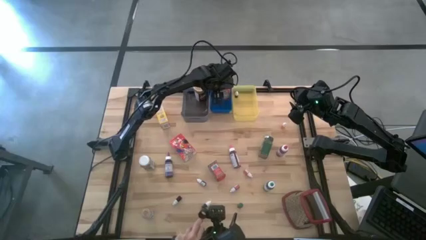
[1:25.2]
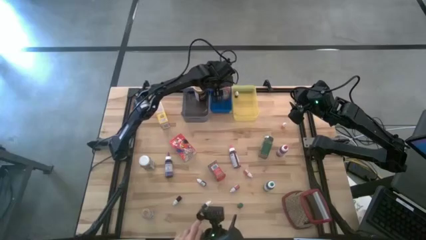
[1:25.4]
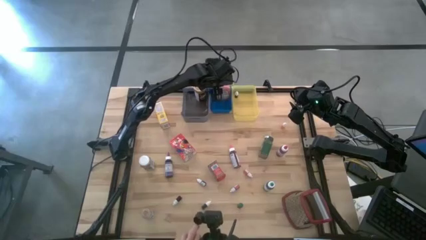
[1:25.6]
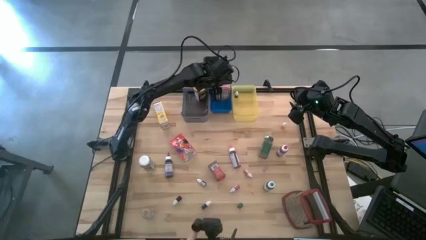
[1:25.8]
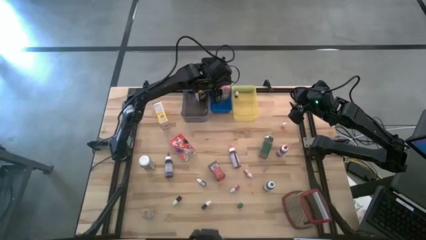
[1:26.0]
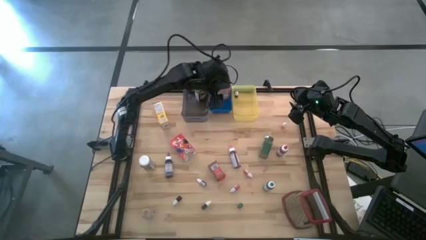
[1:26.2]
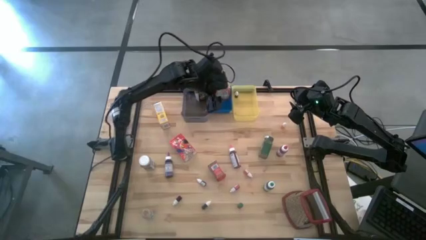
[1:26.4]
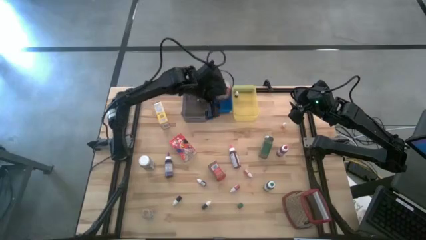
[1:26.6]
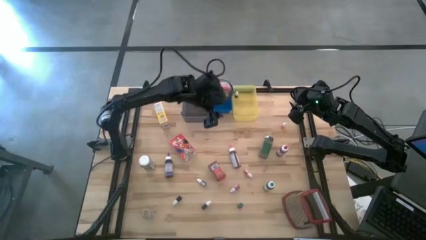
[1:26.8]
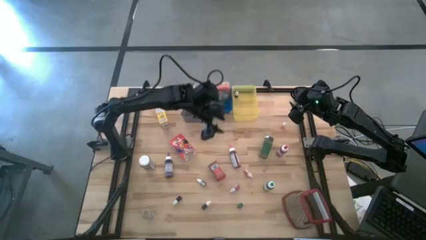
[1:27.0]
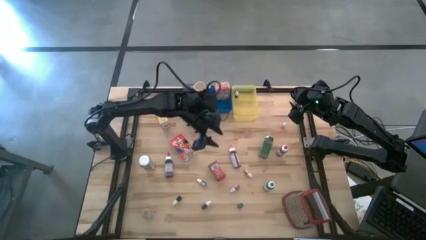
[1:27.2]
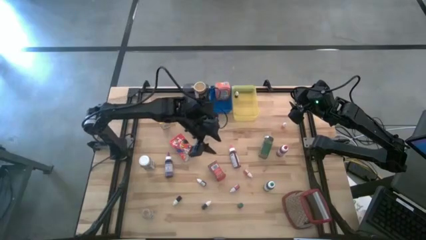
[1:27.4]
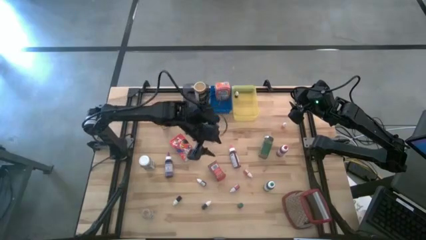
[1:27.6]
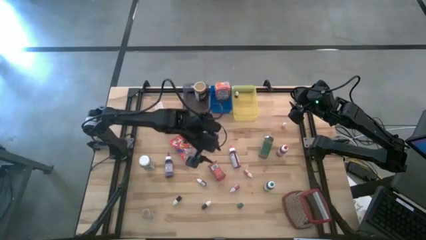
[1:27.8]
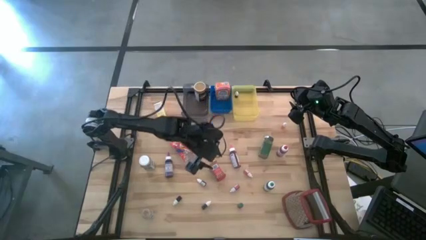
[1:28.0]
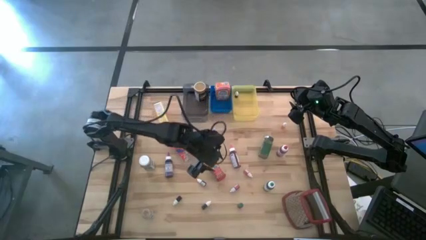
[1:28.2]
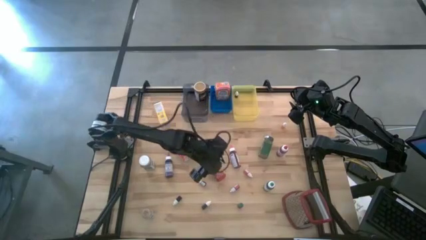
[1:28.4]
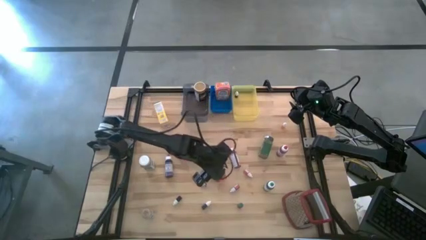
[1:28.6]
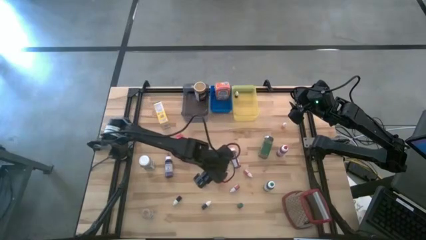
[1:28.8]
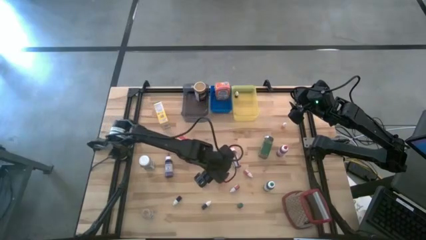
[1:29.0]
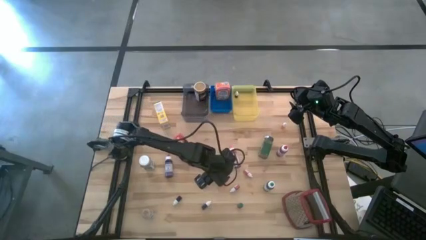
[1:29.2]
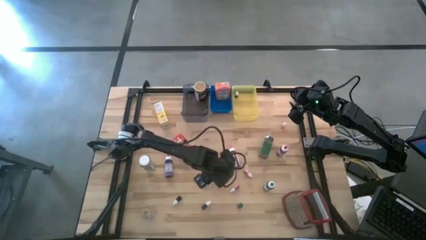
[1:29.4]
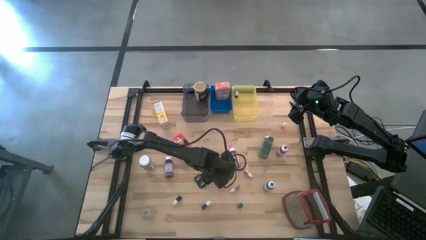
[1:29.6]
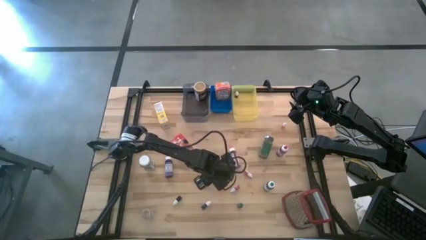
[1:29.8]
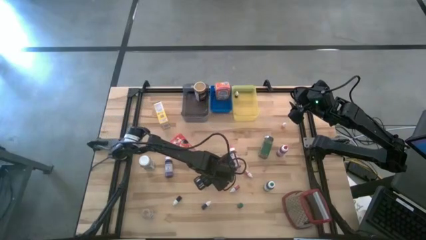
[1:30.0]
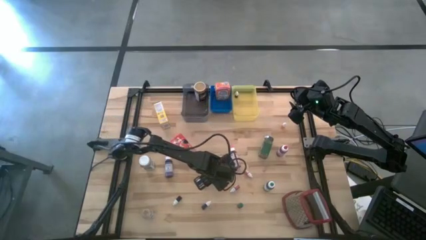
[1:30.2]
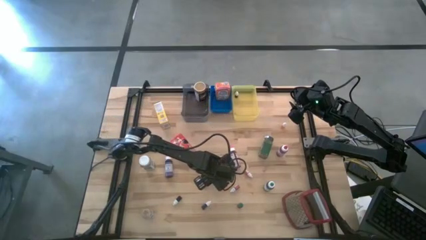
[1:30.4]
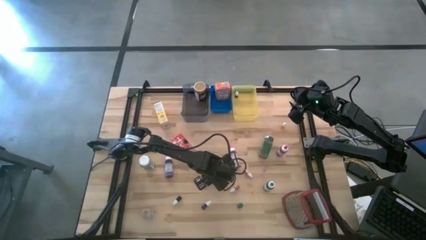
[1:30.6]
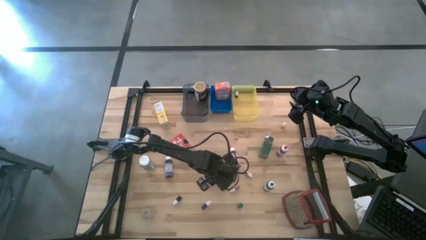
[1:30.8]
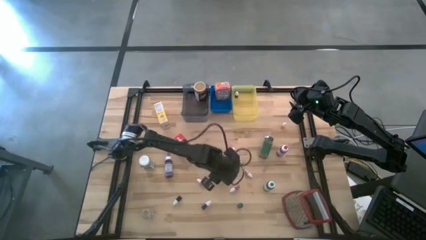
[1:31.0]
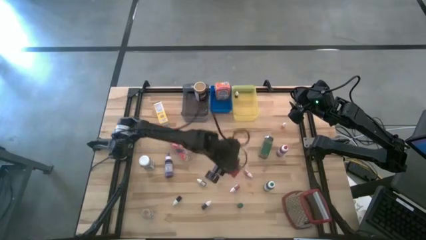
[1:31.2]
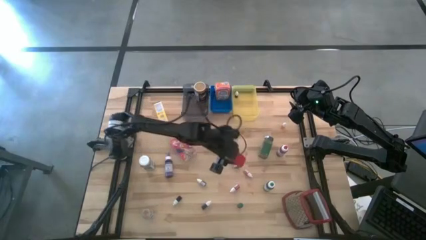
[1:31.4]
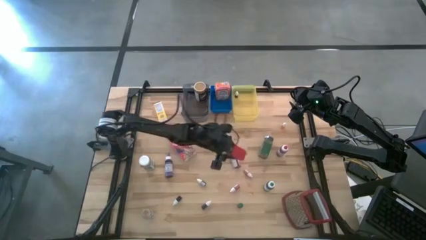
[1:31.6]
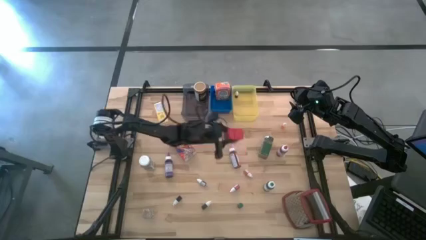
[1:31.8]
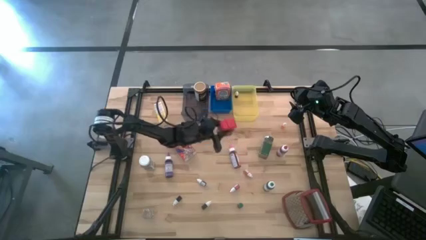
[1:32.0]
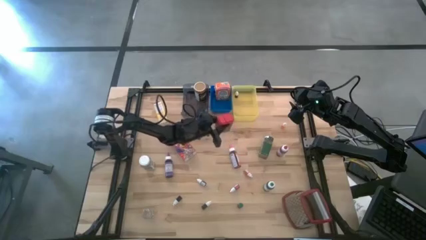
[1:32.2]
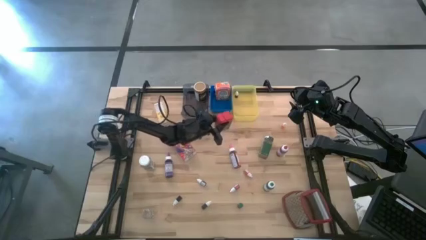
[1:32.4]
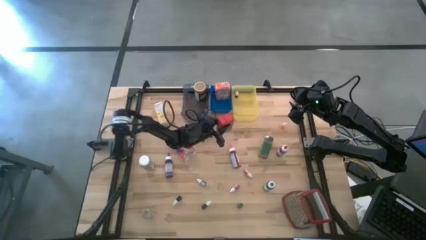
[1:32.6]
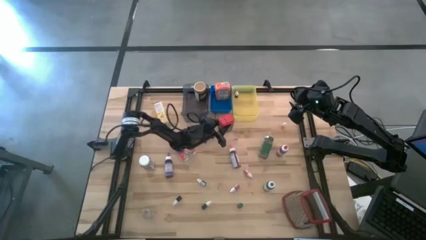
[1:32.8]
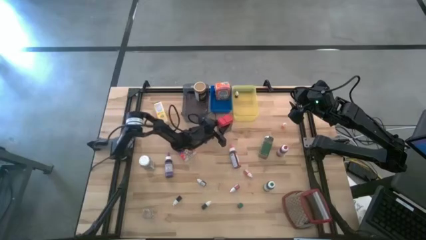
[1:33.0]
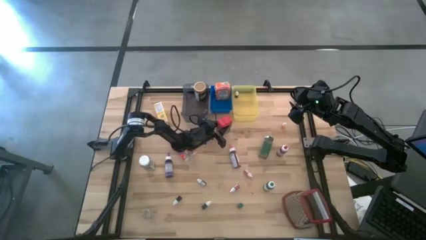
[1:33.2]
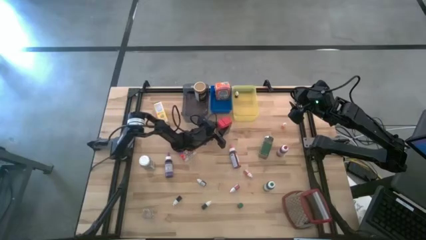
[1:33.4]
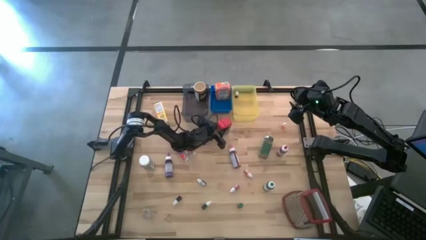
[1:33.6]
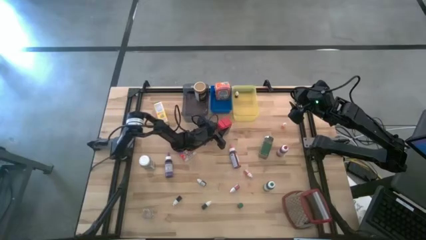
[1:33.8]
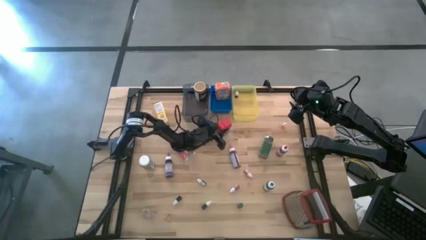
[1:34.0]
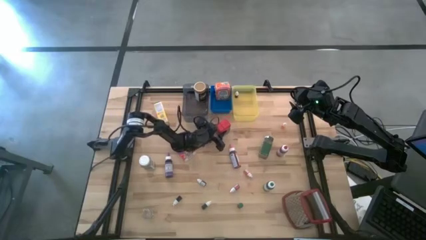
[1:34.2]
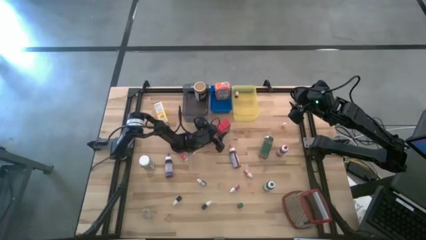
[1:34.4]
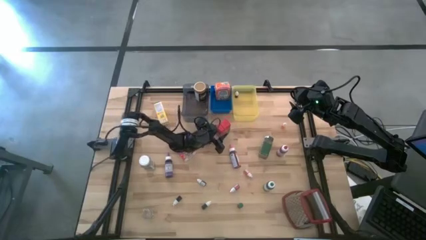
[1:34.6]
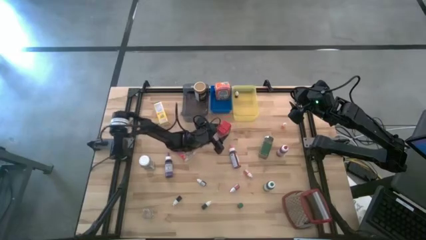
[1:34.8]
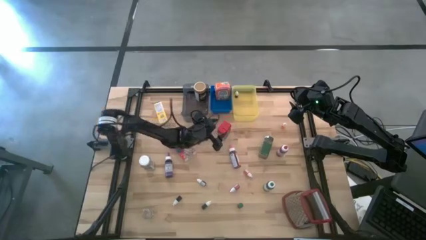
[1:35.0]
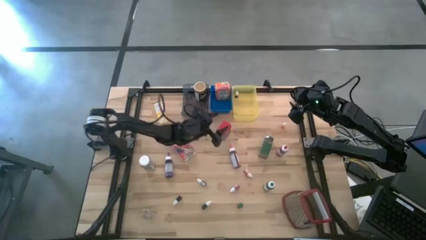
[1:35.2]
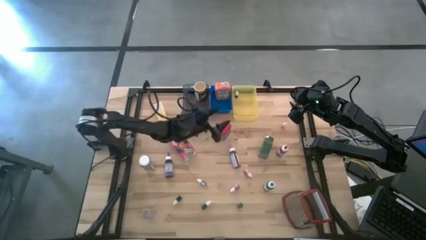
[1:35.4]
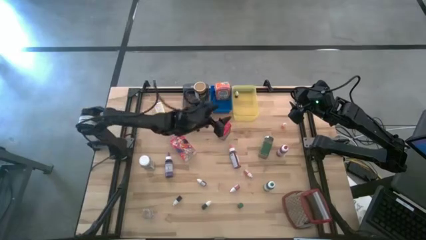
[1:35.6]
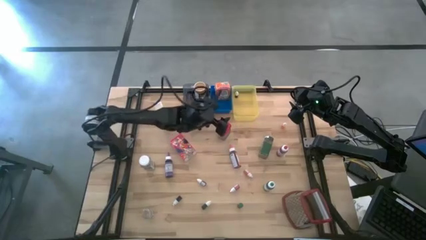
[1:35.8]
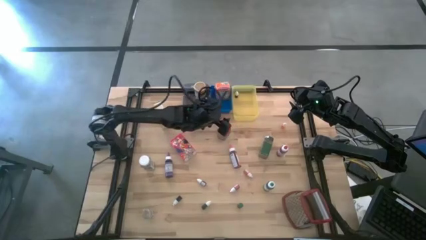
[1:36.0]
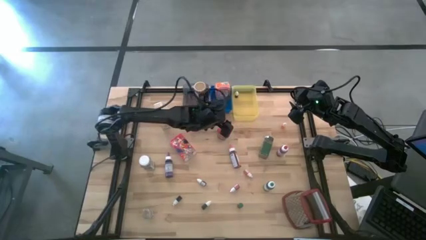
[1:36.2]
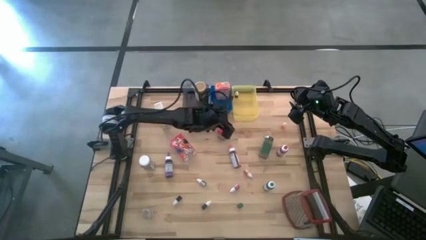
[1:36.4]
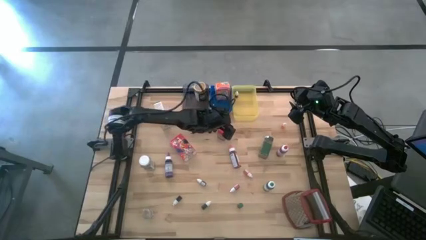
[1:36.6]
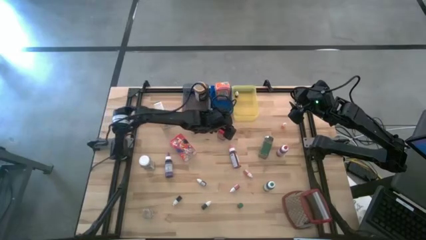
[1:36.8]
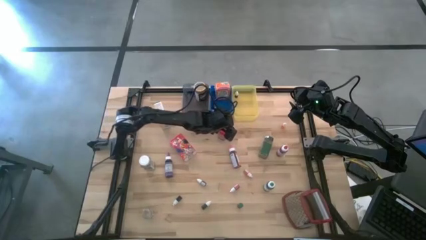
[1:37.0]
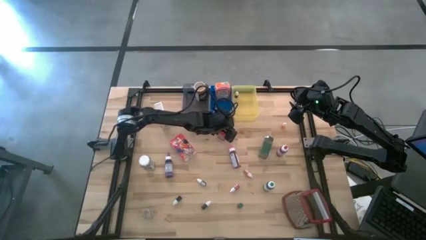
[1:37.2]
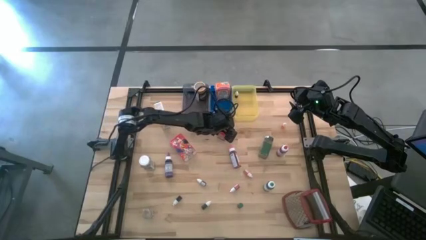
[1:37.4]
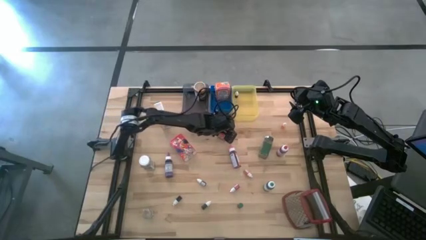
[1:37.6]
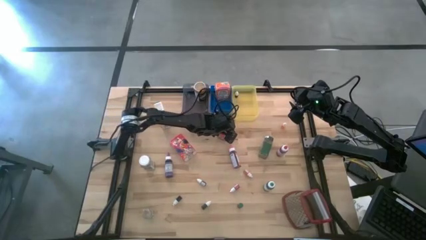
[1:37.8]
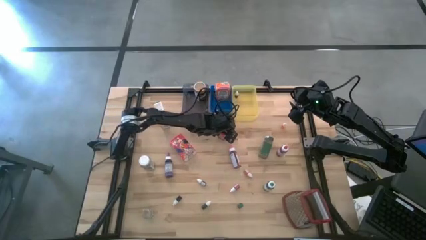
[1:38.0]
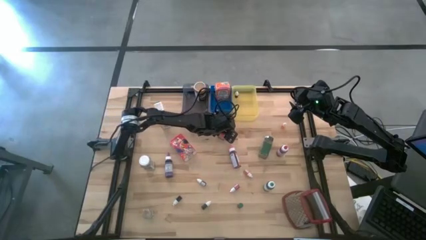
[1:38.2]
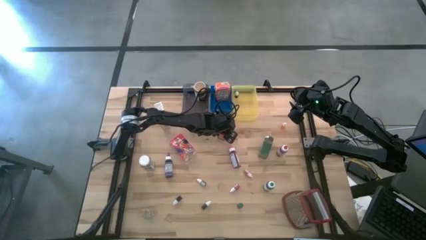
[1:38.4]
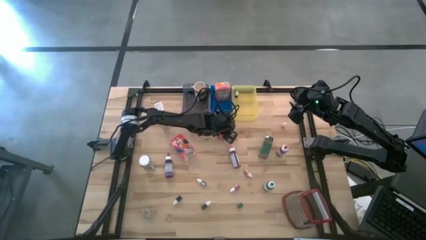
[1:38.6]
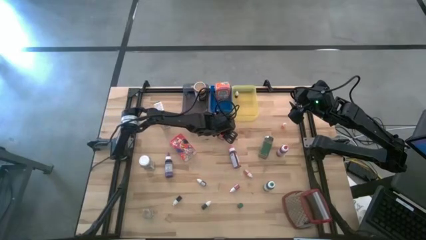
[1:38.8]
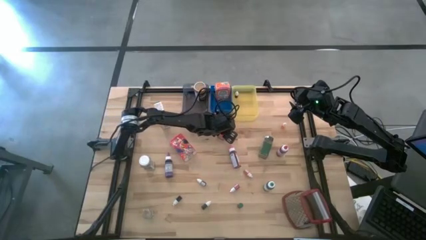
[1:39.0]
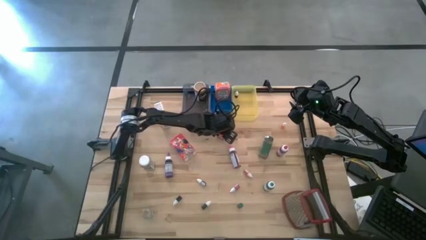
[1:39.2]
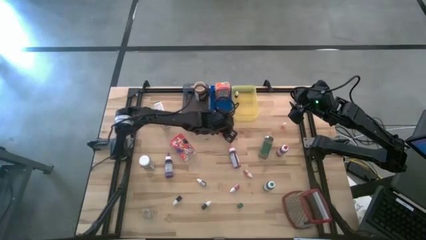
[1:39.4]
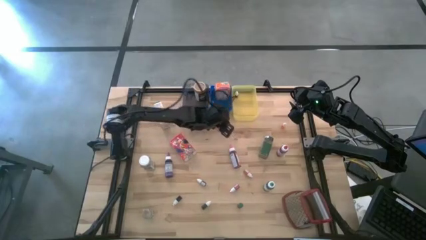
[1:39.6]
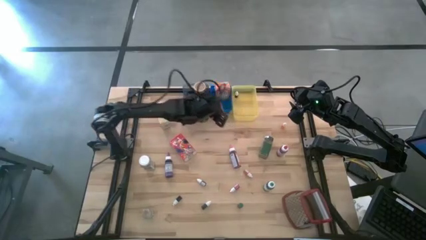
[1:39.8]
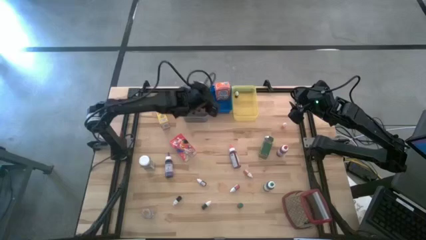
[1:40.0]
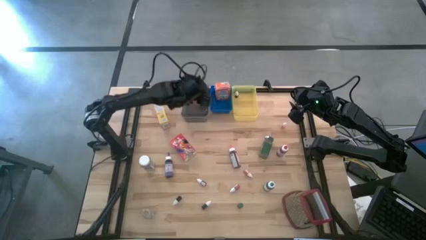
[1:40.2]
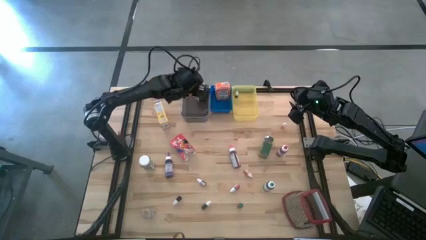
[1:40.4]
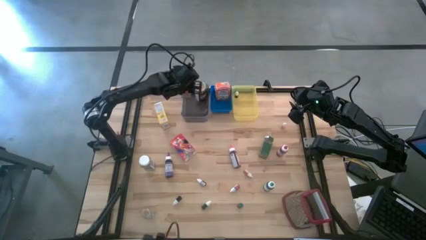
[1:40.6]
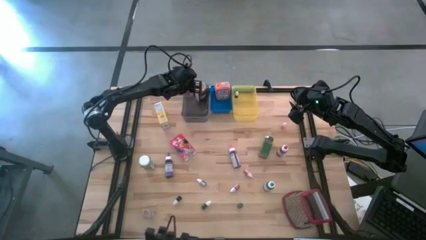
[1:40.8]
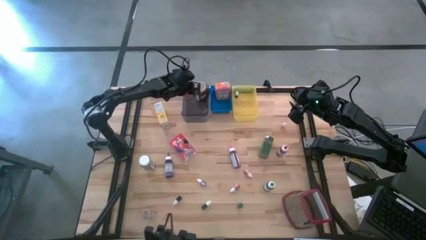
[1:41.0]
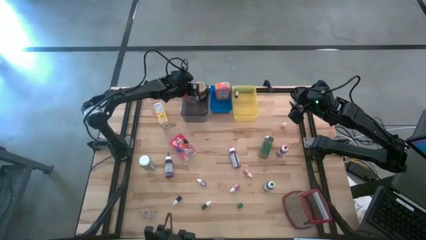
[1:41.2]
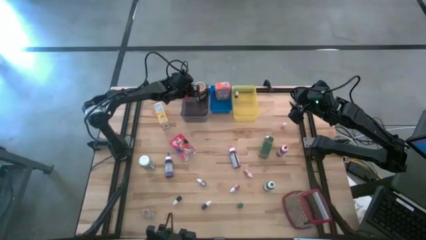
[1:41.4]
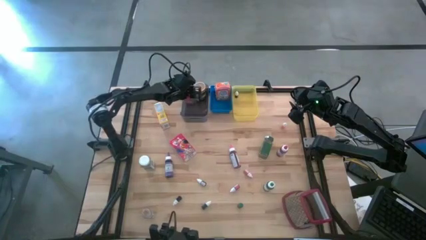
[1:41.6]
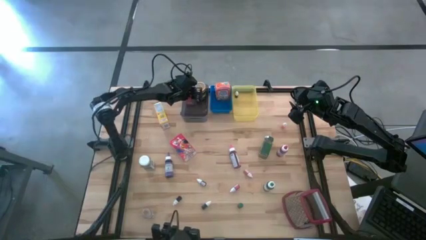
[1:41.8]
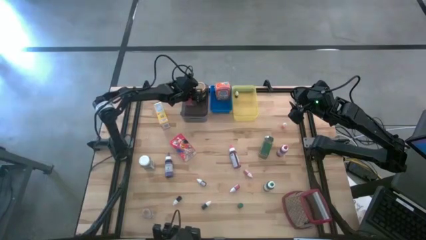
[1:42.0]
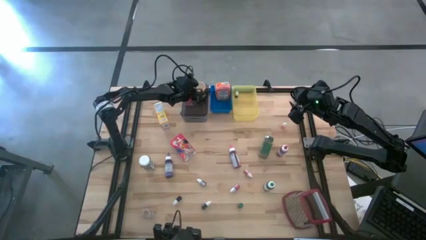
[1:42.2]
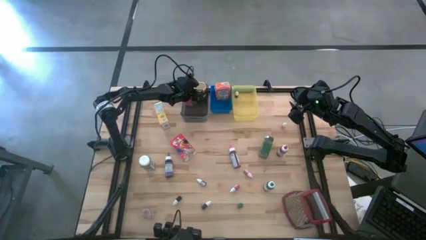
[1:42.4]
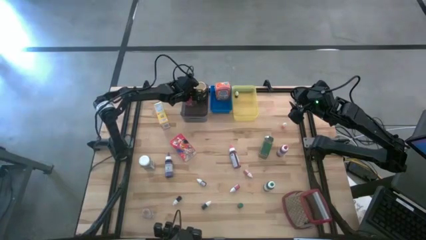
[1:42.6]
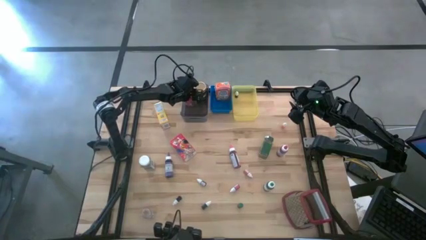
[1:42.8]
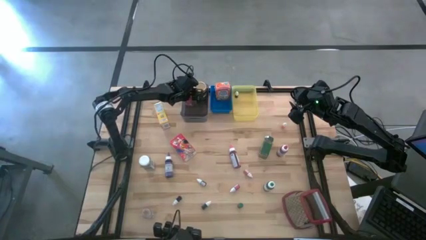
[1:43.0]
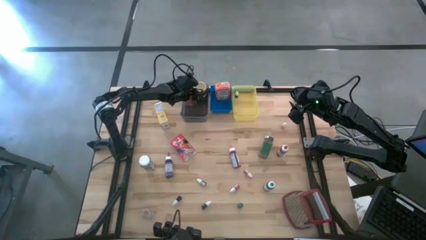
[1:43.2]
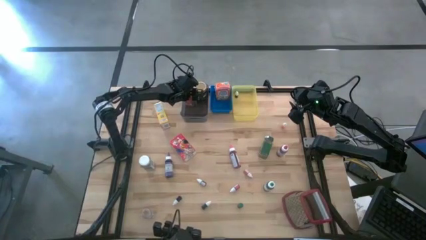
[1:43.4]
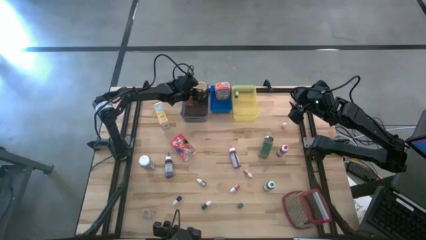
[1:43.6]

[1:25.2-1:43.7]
Task: Pick & Place Kitchen Items
Put the red spice can into the black bin
